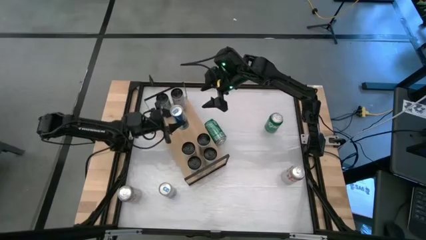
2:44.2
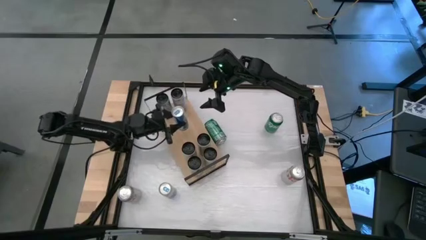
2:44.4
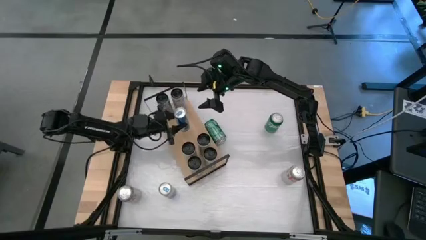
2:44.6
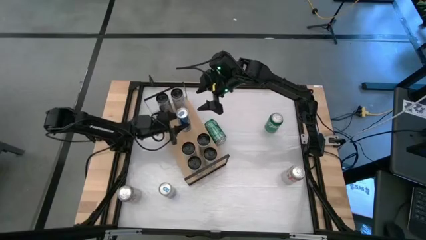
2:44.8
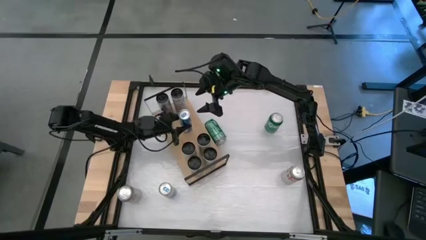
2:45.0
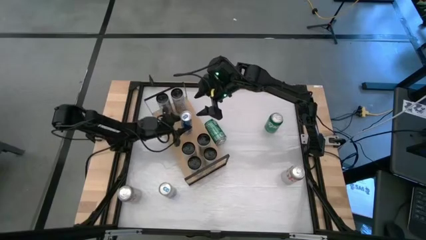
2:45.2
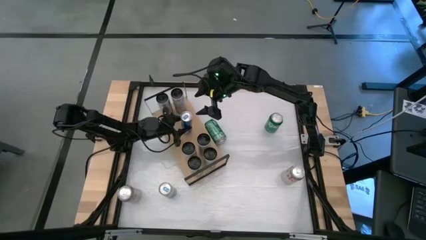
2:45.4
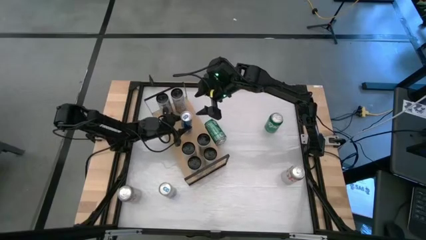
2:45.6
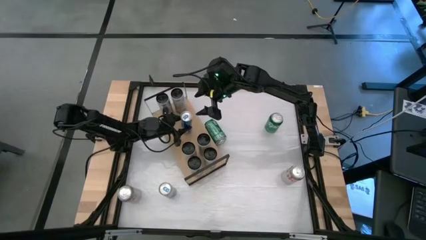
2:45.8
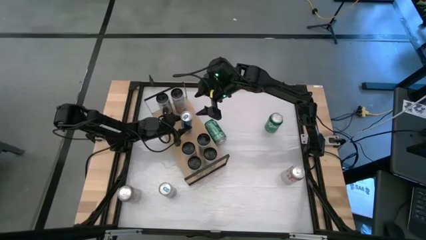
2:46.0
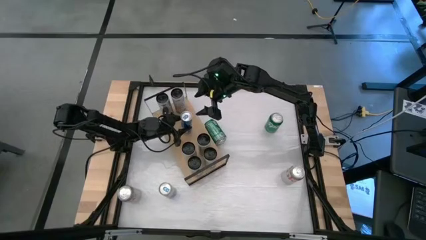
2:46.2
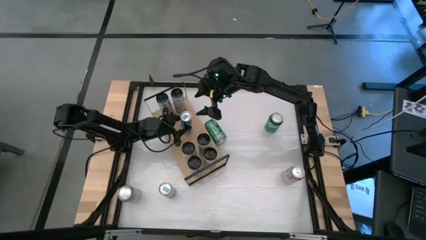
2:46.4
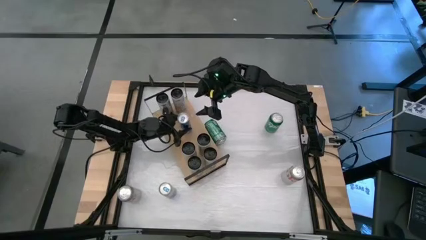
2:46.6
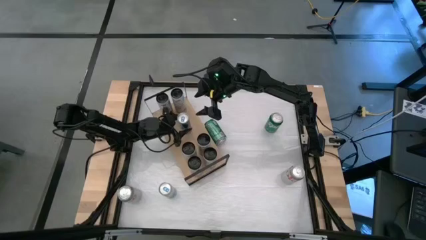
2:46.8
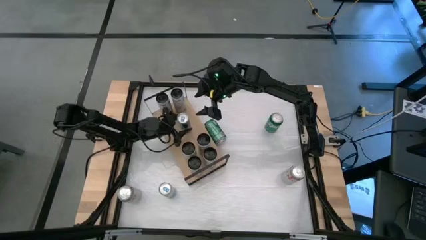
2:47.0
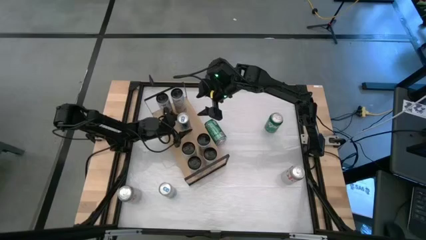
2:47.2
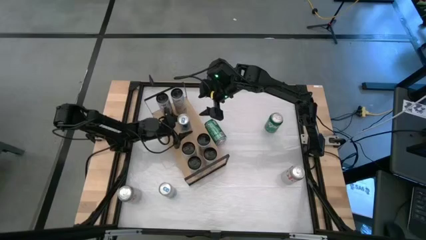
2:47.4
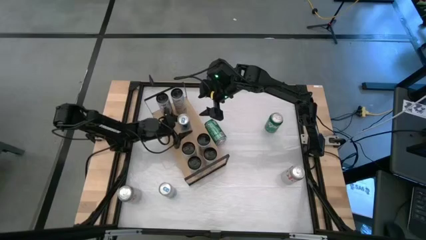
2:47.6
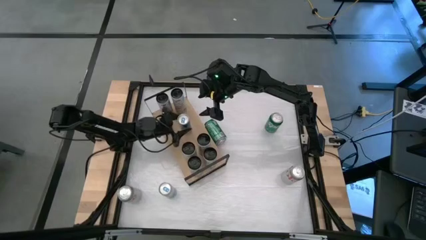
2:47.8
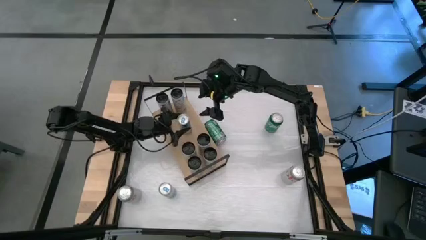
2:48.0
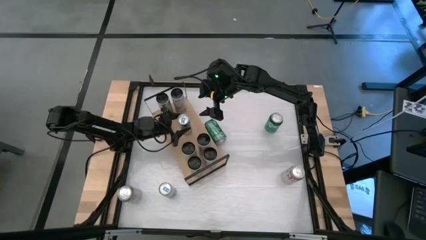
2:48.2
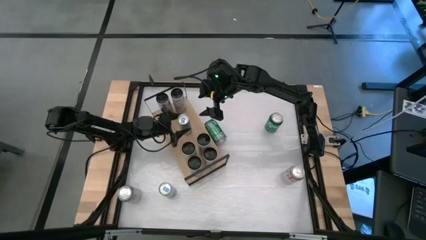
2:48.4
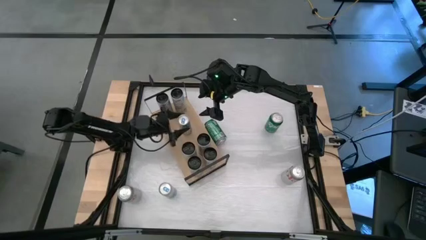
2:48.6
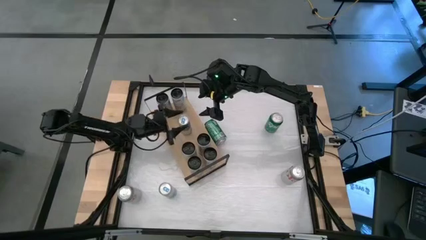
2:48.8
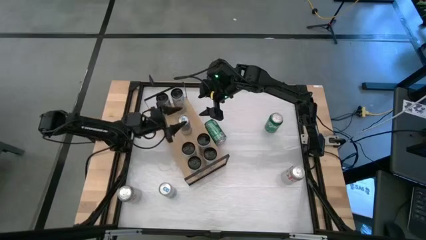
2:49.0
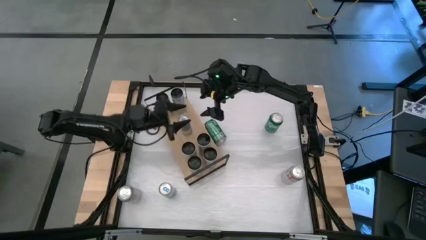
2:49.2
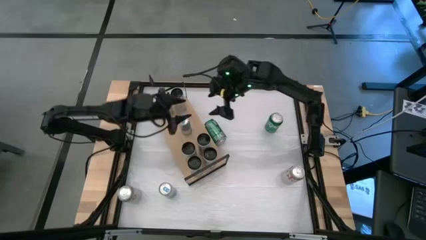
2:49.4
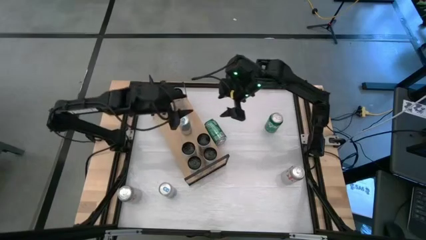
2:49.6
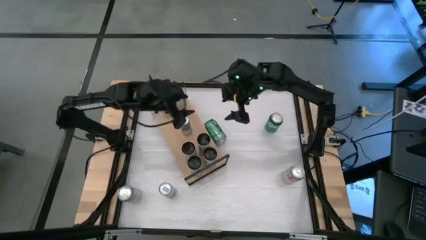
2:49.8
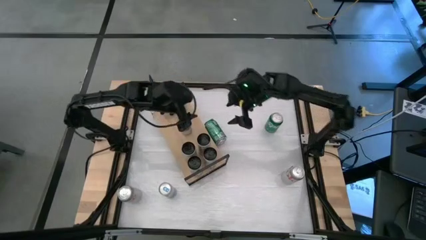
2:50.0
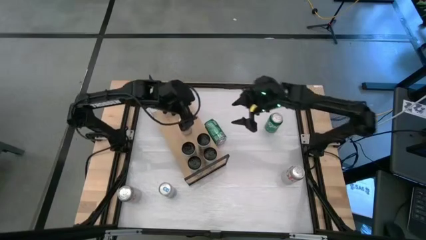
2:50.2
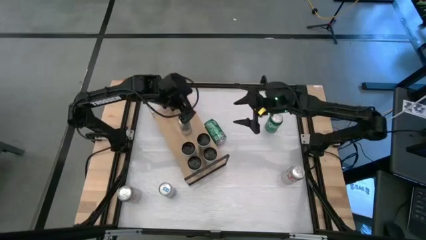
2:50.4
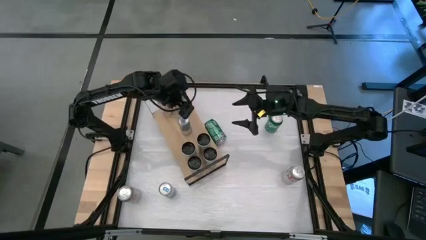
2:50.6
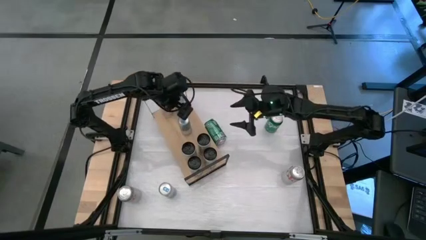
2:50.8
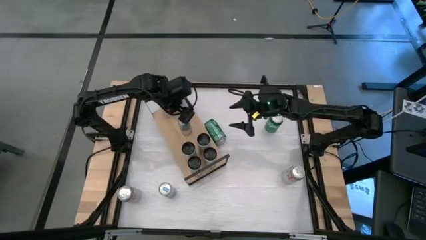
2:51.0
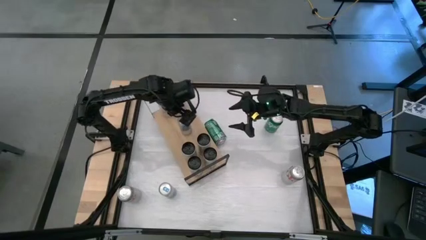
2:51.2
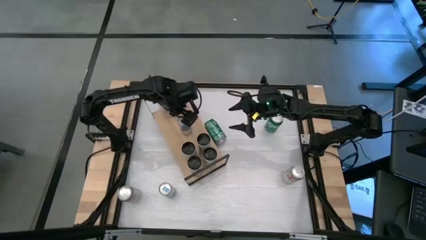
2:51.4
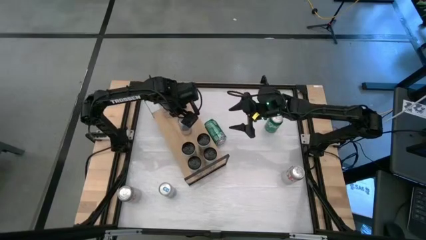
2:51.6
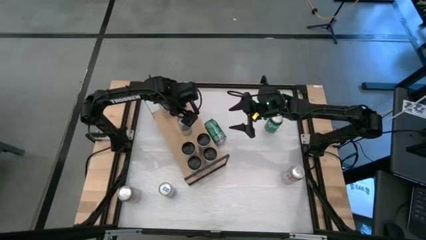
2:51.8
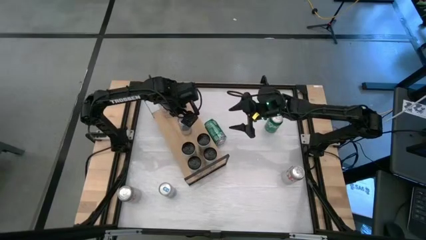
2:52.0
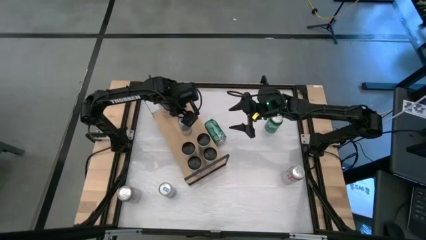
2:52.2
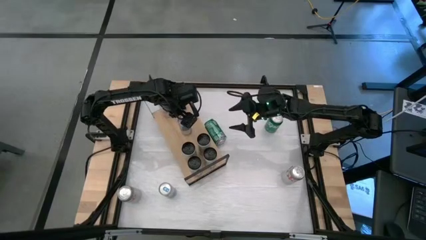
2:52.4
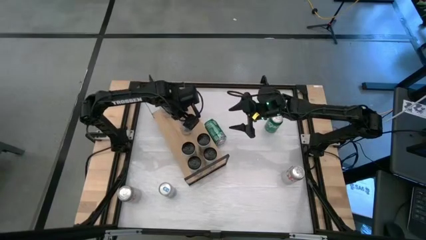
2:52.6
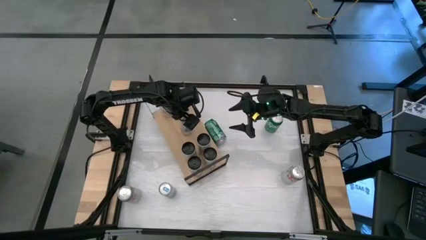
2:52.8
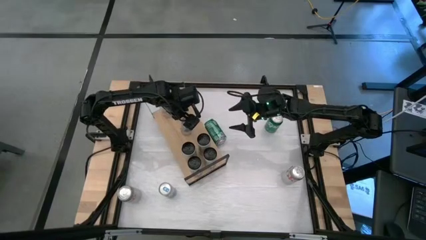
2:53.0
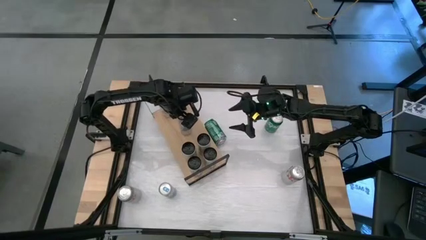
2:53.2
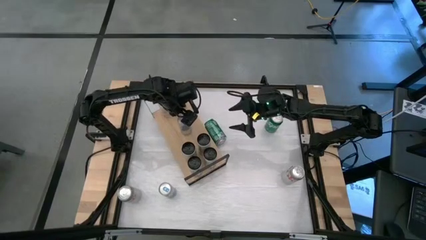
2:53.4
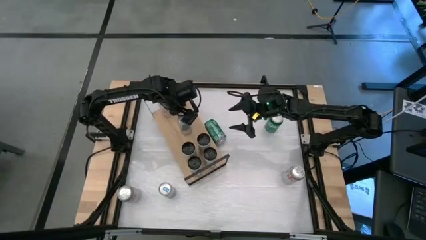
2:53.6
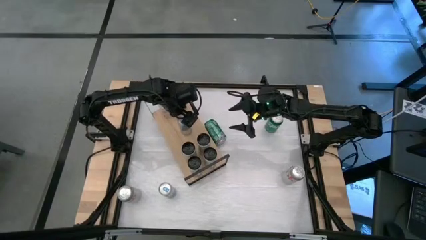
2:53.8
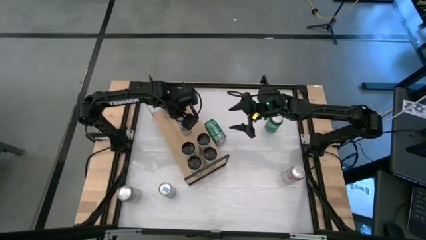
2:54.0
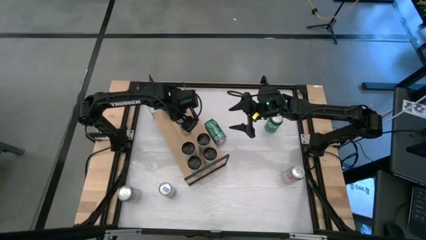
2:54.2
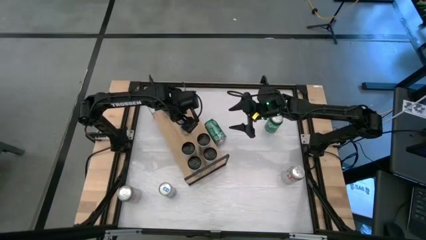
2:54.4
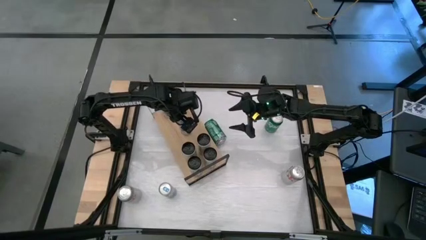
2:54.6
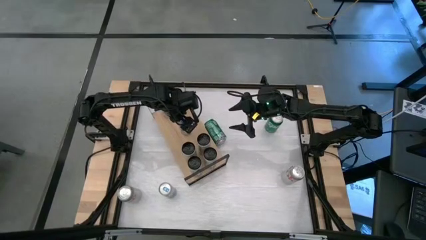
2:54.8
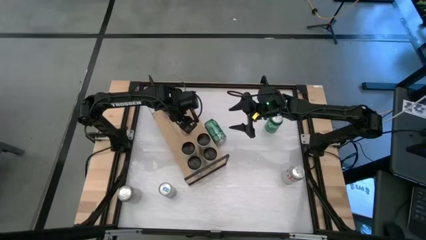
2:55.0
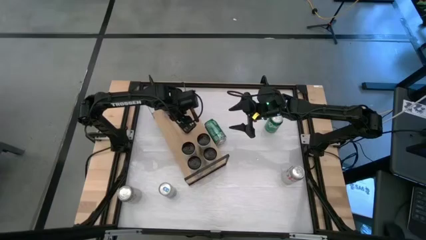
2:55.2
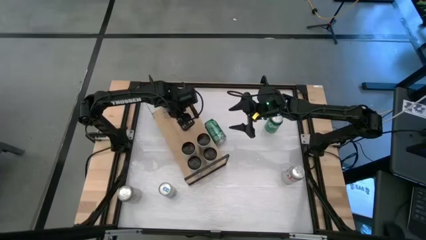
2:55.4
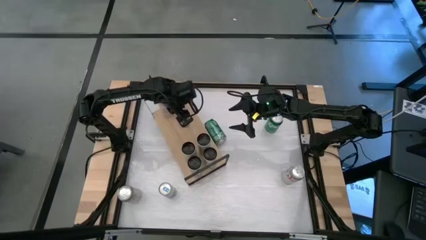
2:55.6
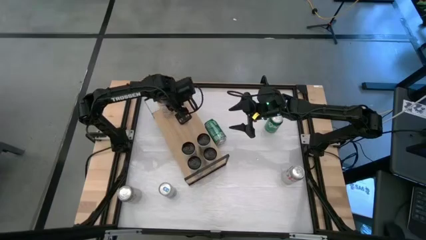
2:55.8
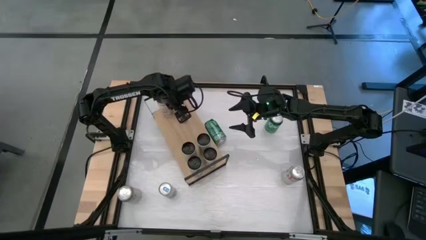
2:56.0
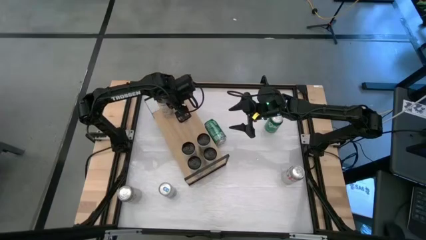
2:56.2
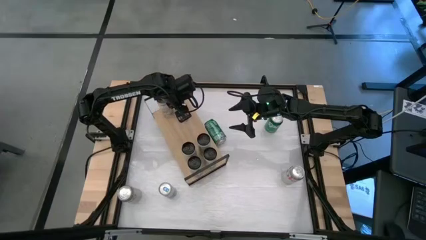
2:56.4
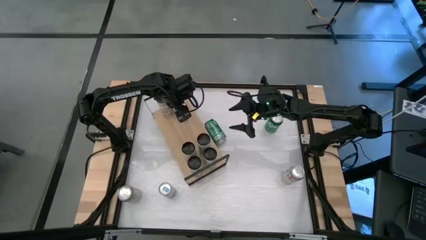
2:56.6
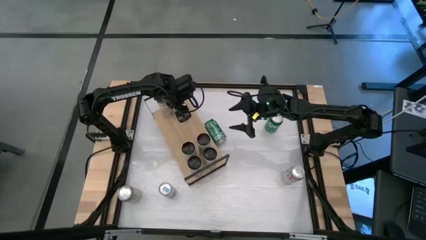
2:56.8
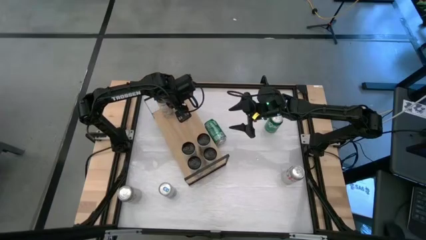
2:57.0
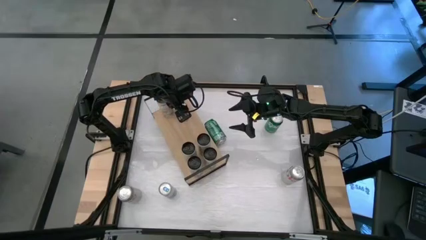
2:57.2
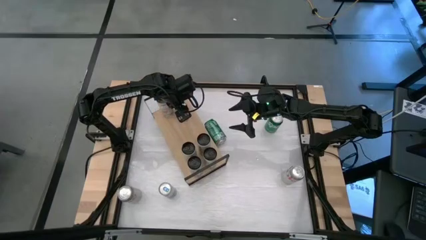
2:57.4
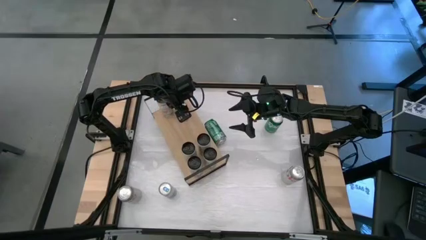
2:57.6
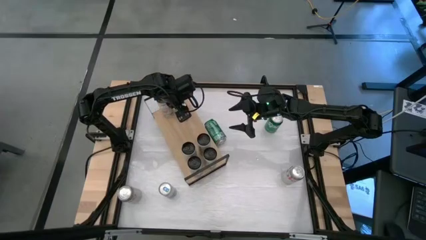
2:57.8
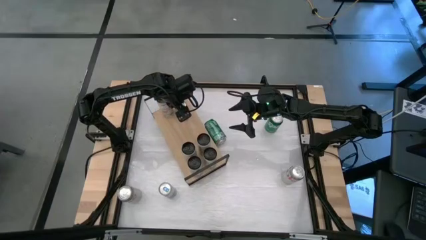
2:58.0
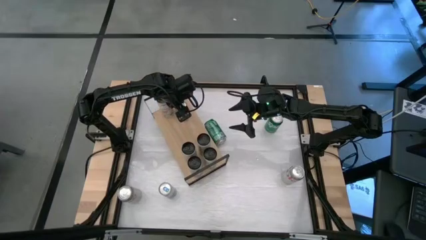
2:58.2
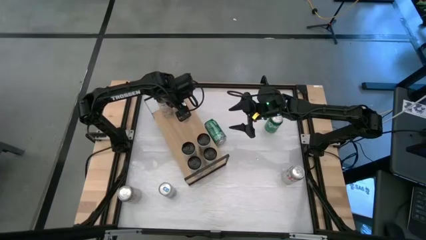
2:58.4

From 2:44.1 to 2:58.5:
Task: Place canned beverage on shelf
Put the white blue soda can on the shelf
